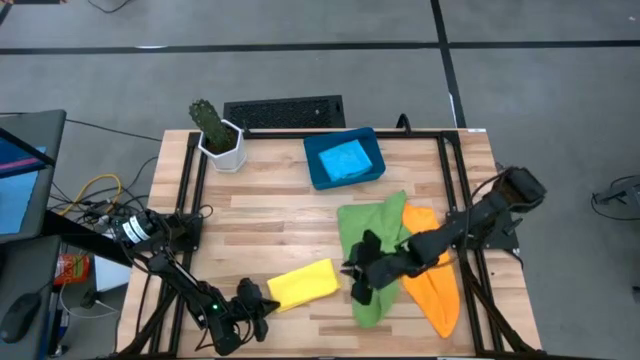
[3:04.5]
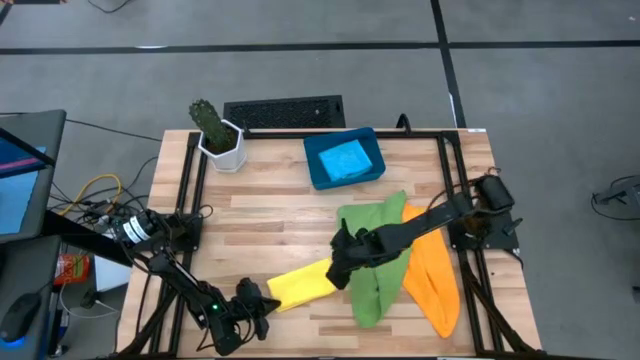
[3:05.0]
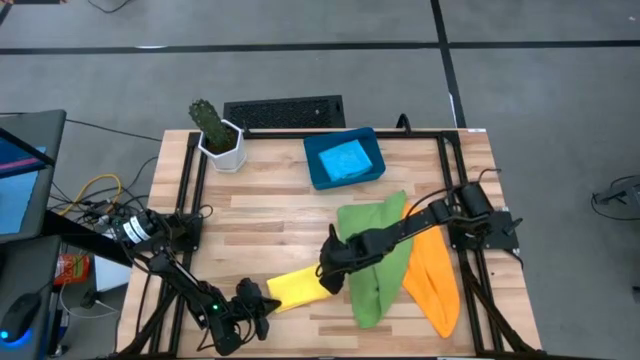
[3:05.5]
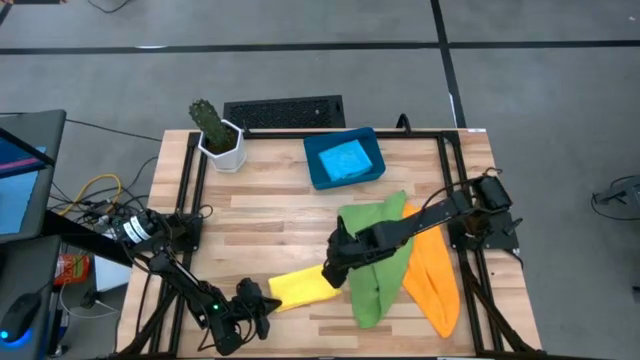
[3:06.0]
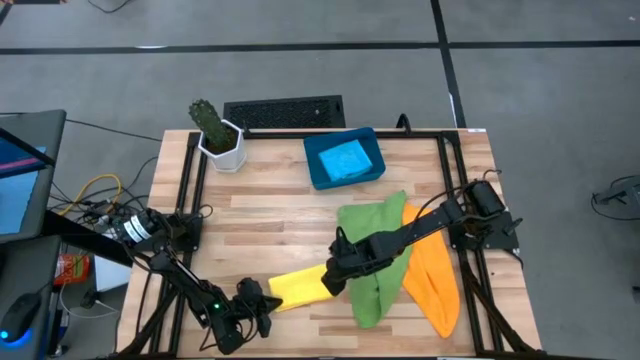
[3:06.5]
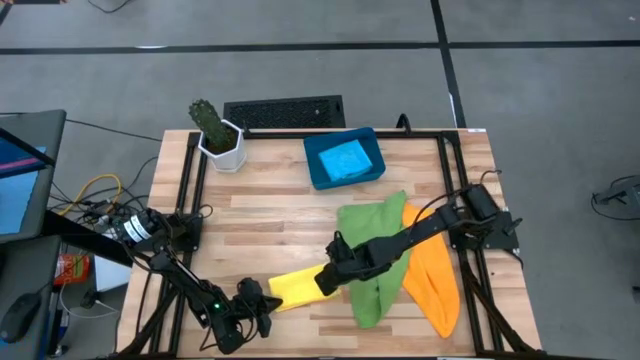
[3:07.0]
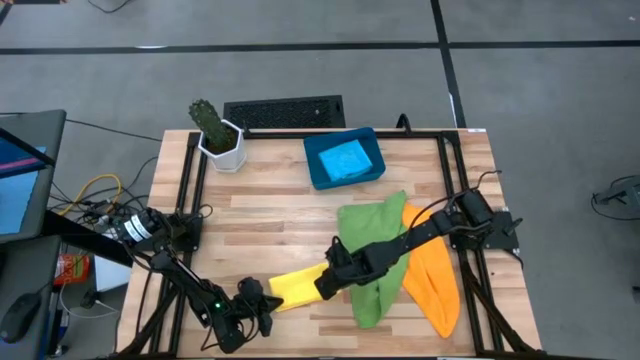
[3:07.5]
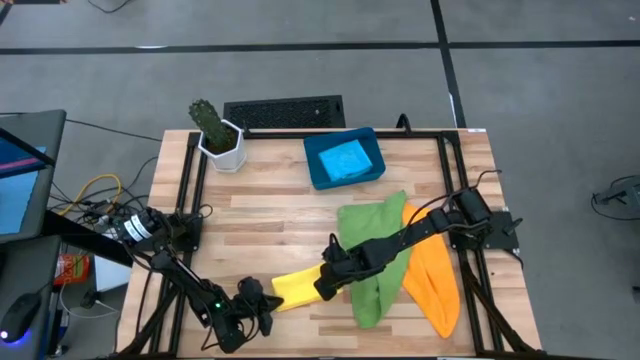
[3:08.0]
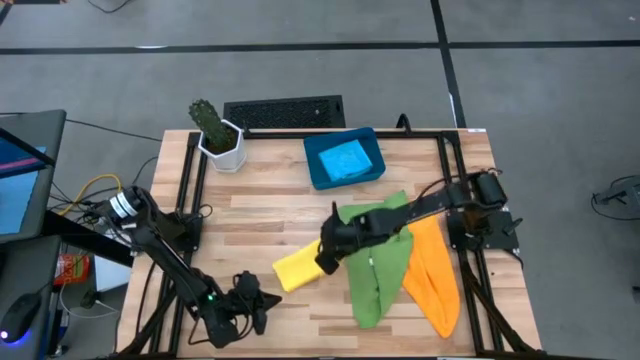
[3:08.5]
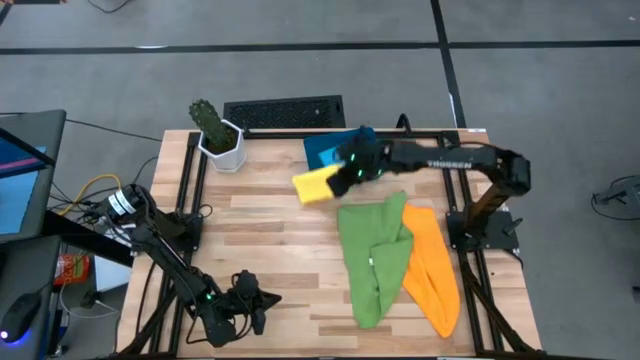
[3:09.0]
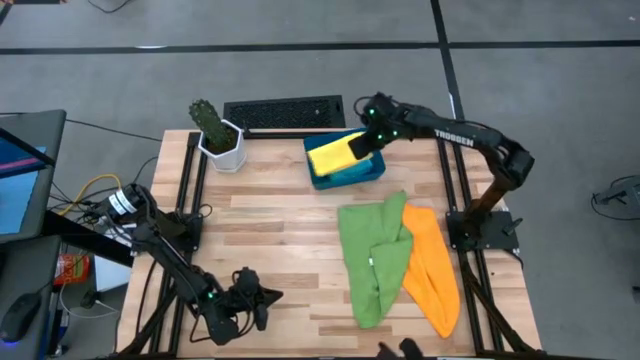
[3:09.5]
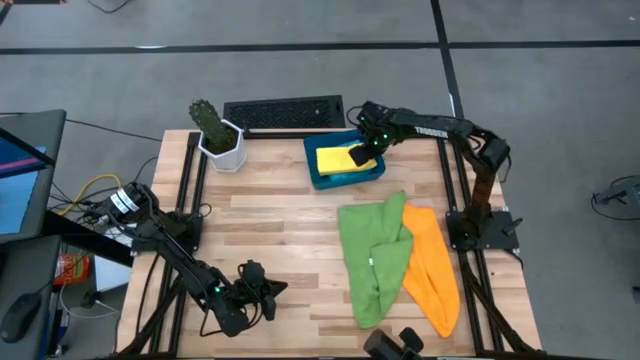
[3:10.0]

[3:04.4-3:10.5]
Task: Fold microfiber towels
Put the folded yellow microfiber cloth into the blue bin

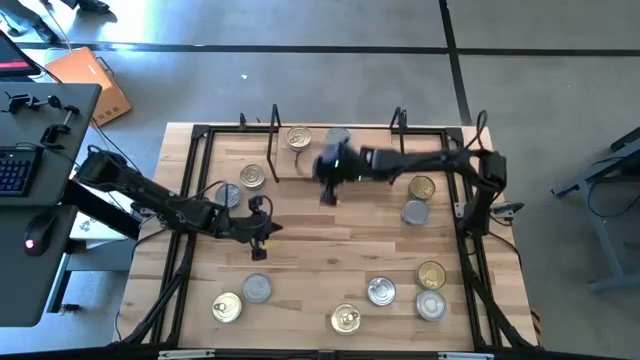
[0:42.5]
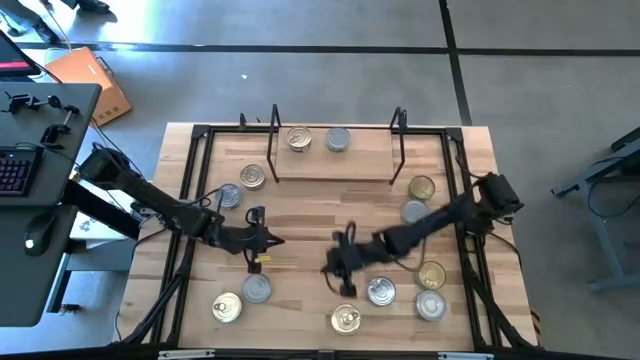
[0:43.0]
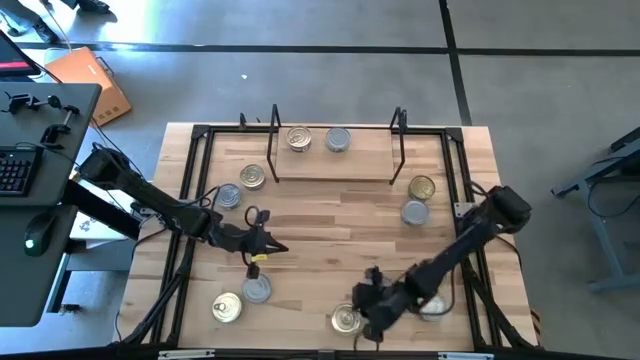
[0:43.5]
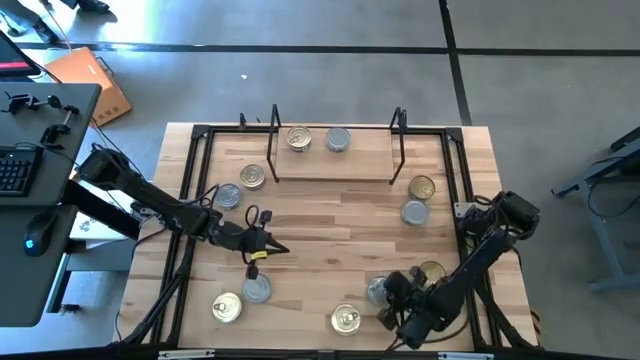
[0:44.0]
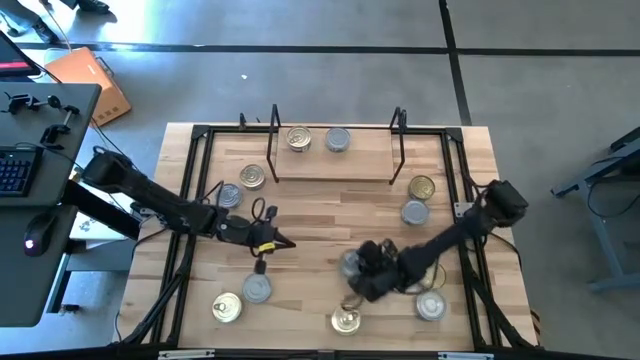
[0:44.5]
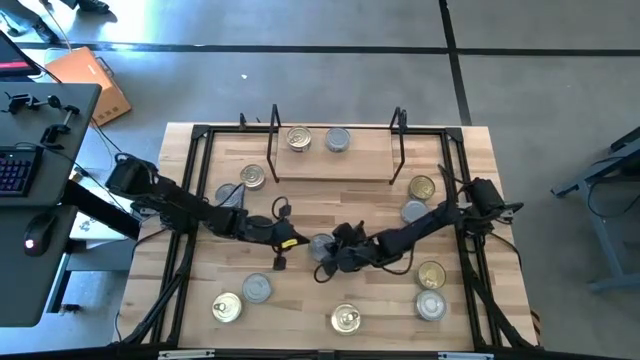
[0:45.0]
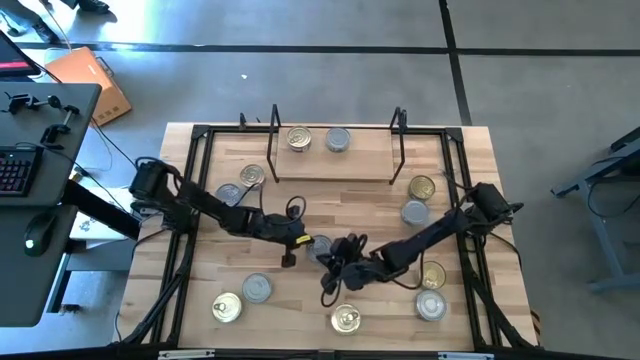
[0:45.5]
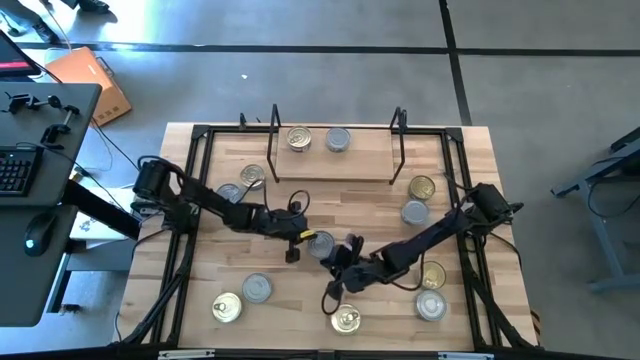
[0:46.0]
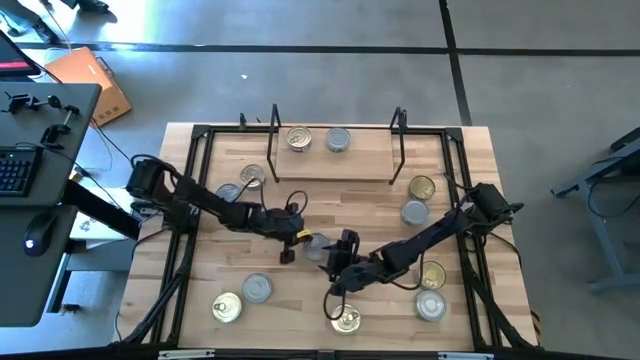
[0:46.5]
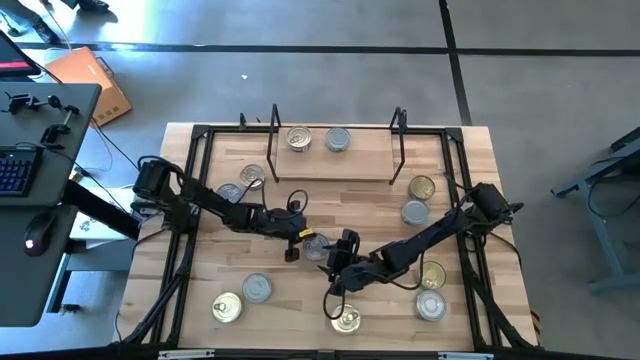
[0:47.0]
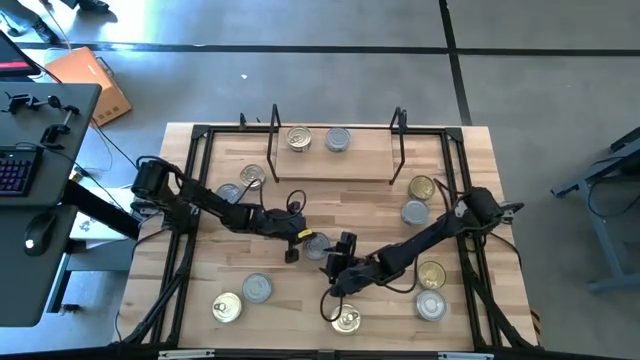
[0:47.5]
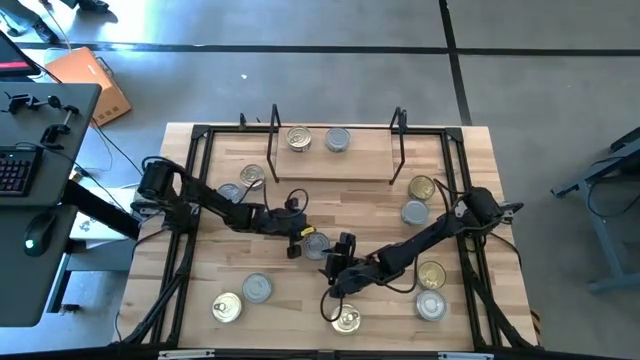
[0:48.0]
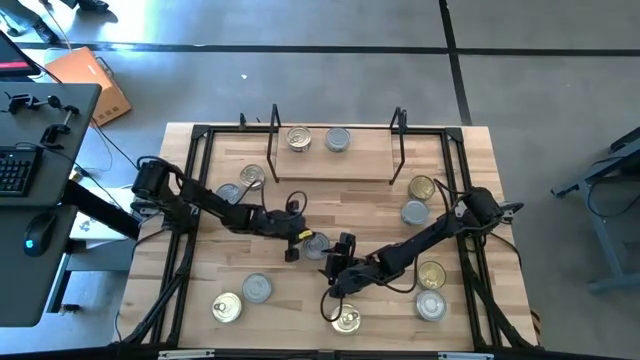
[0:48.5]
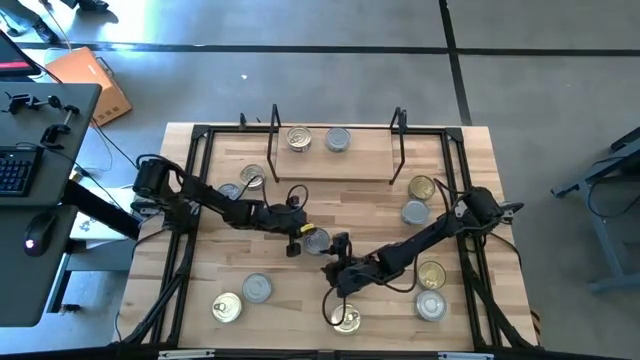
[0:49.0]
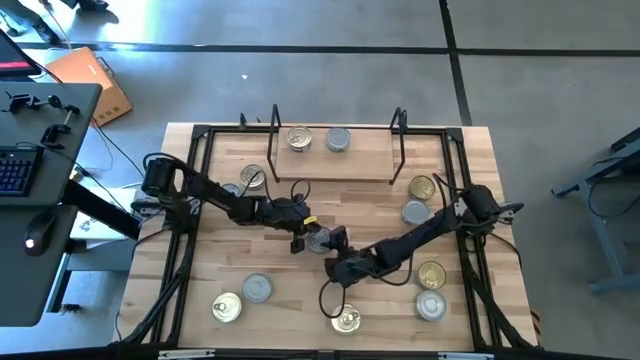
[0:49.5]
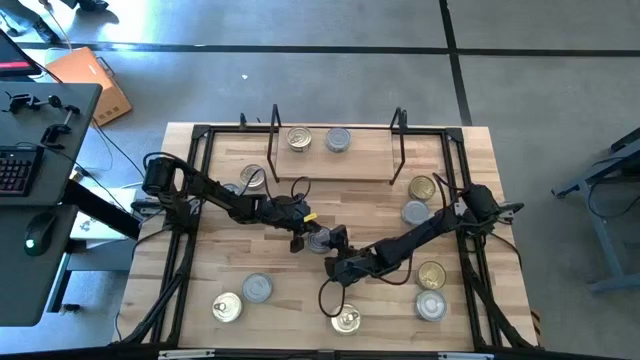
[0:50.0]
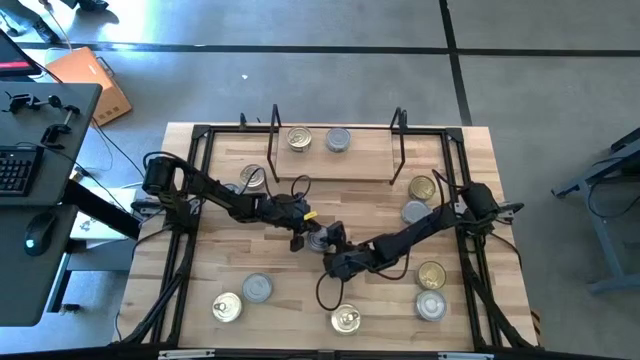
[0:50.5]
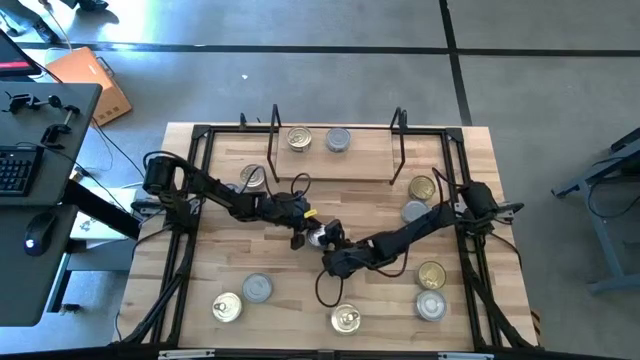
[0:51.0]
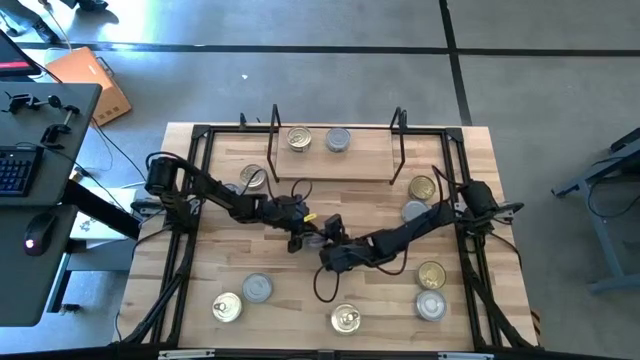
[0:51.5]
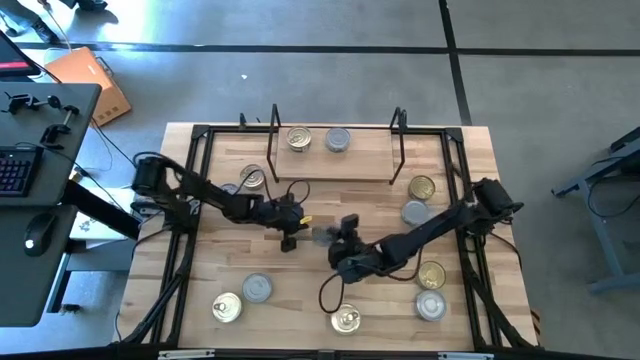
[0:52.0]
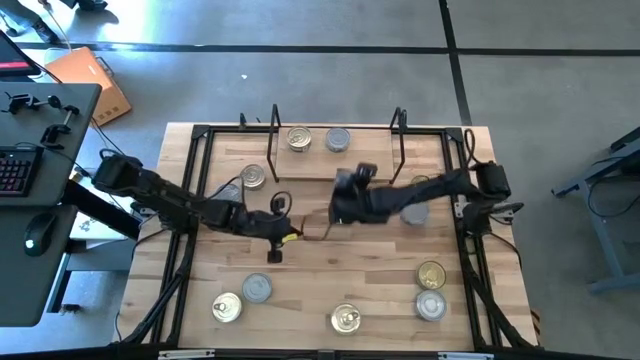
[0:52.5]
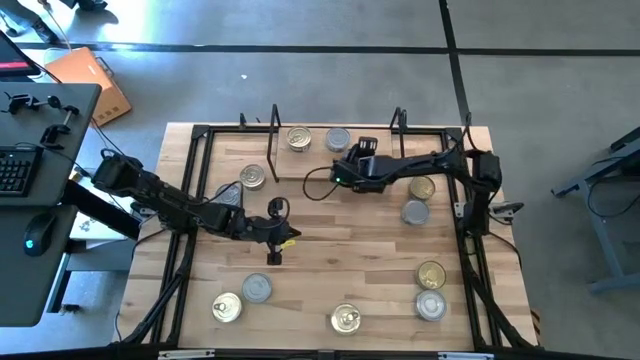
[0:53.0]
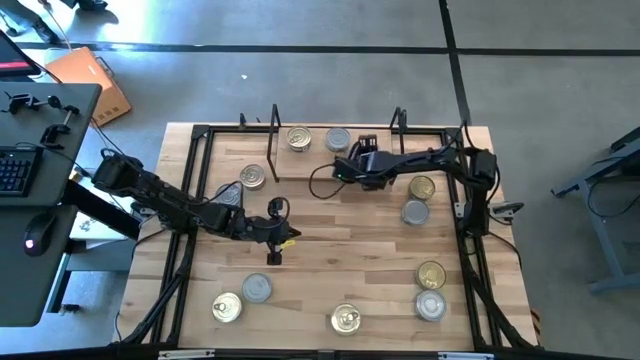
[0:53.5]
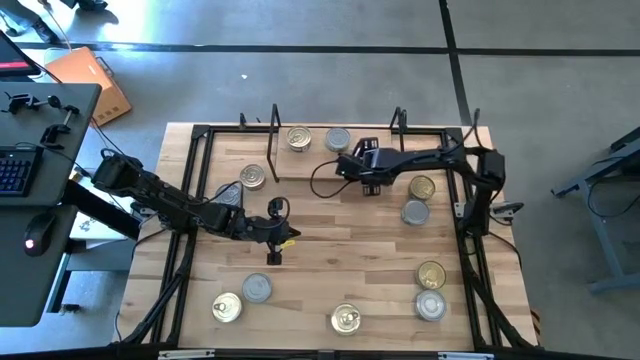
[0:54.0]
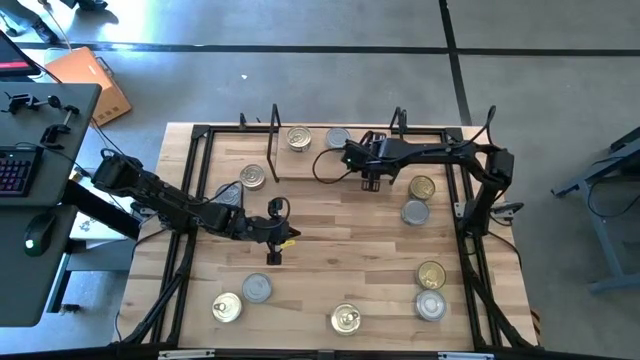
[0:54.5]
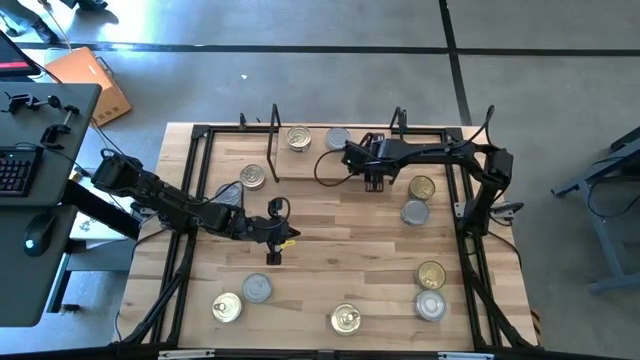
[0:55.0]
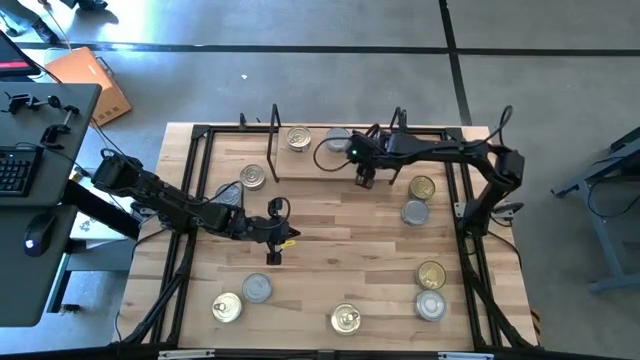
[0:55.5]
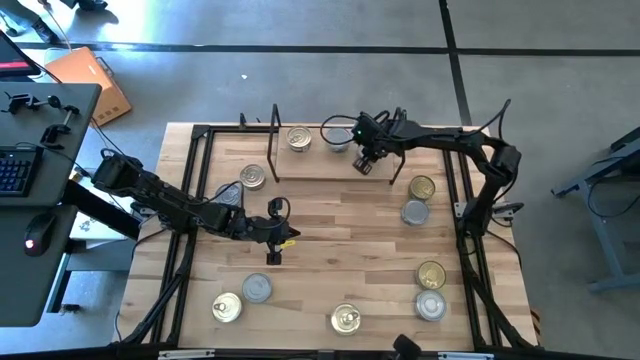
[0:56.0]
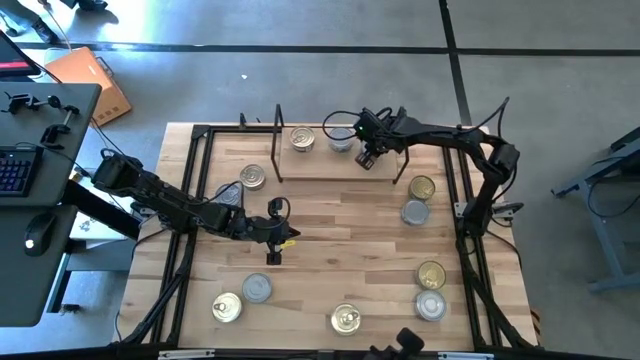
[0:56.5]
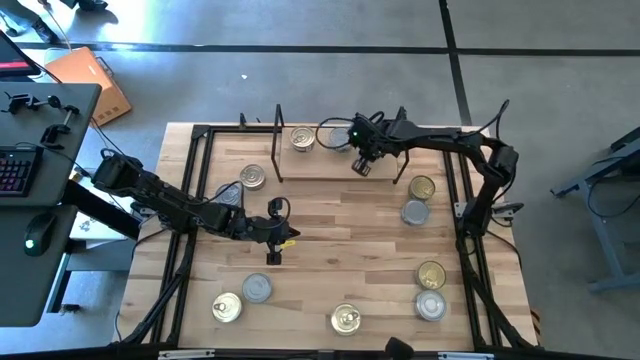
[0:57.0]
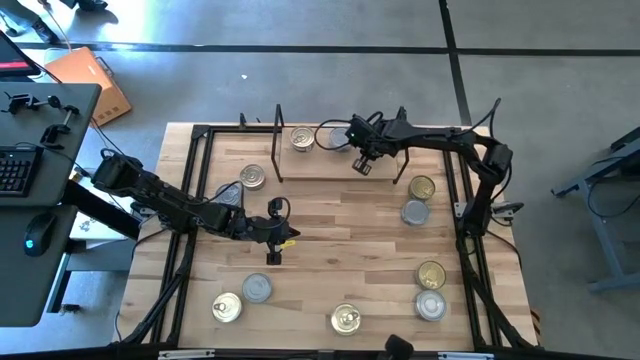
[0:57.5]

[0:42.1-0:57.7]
Task: Stack canned seafood by type on shelf
Put the green tuna can on the shelf
